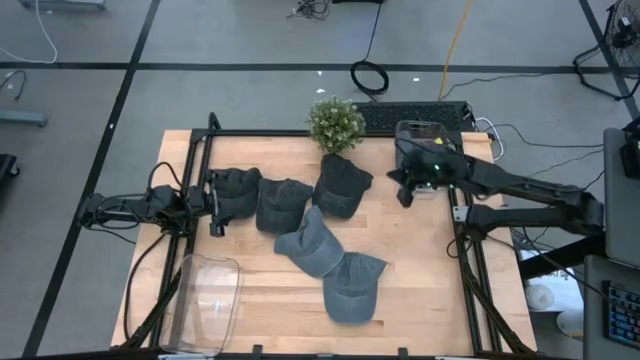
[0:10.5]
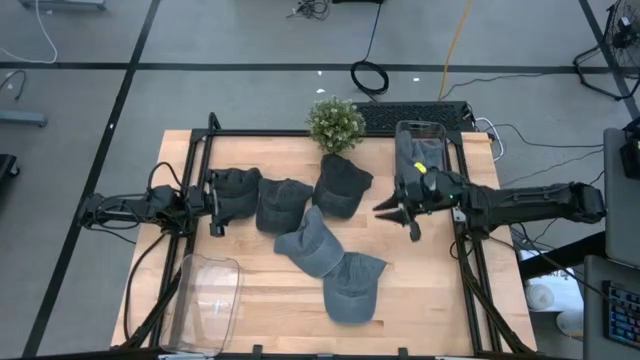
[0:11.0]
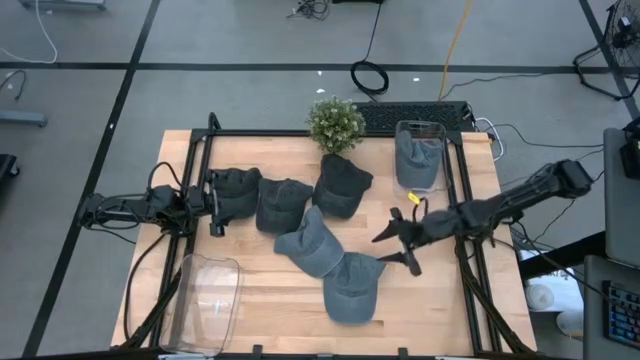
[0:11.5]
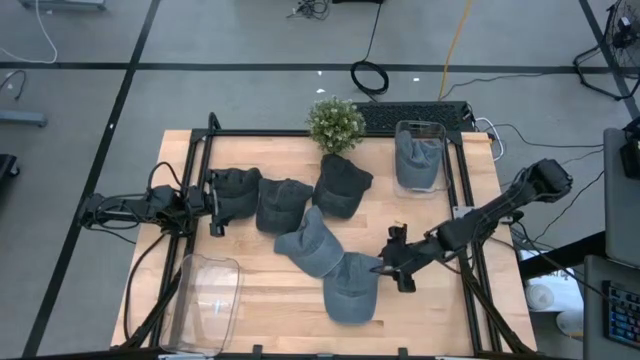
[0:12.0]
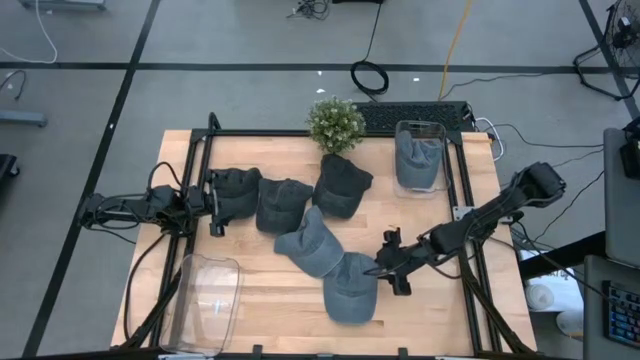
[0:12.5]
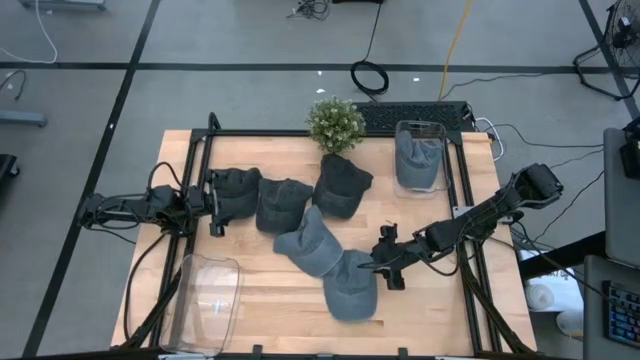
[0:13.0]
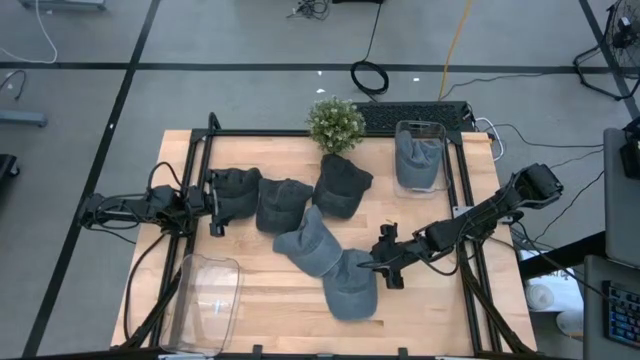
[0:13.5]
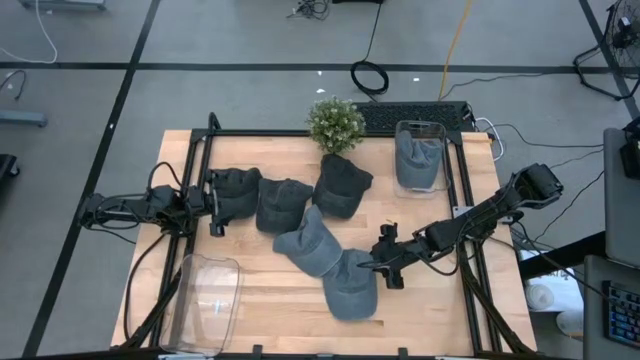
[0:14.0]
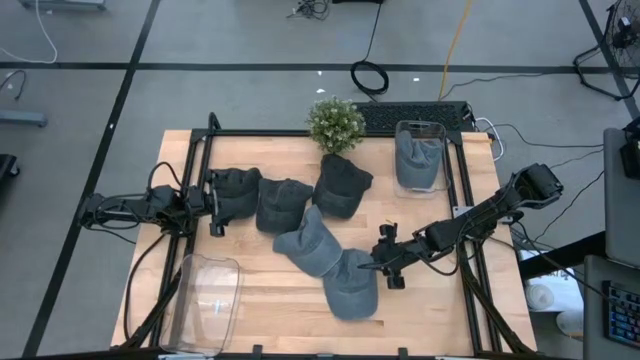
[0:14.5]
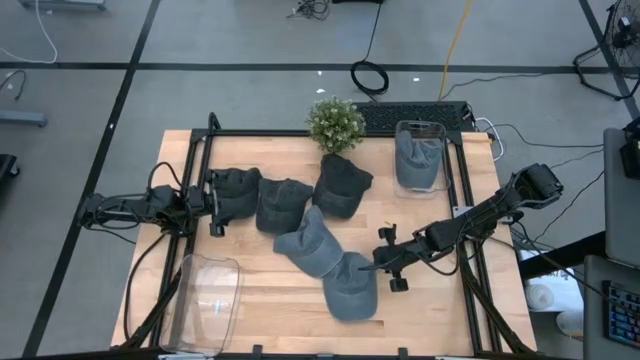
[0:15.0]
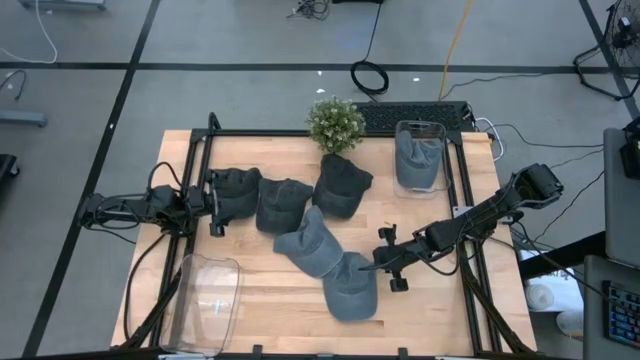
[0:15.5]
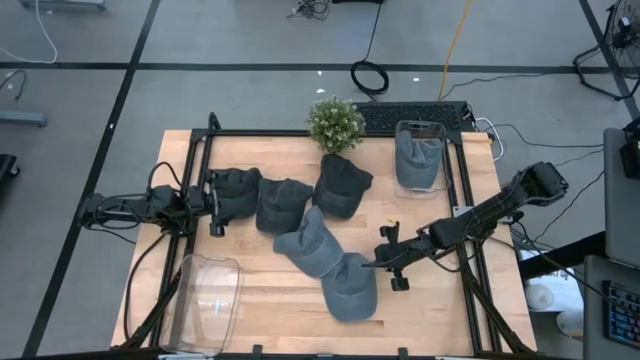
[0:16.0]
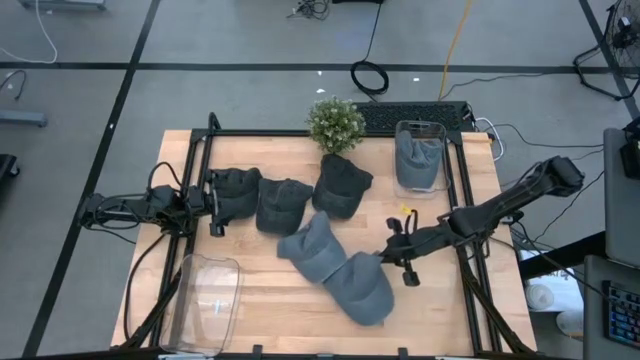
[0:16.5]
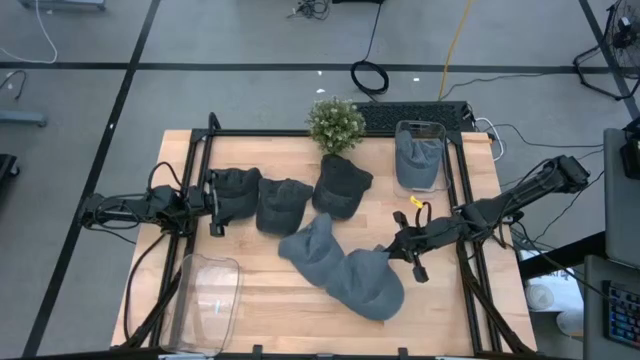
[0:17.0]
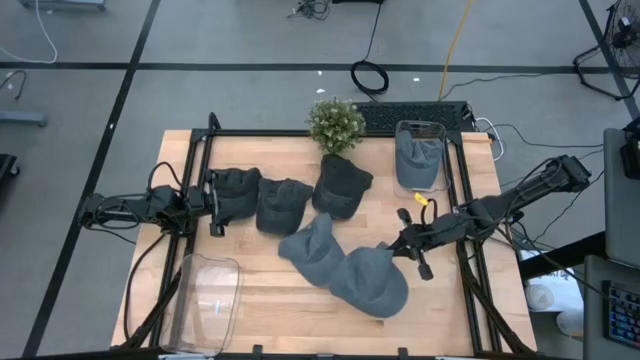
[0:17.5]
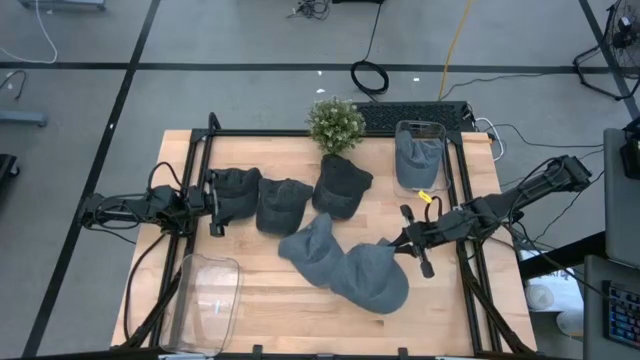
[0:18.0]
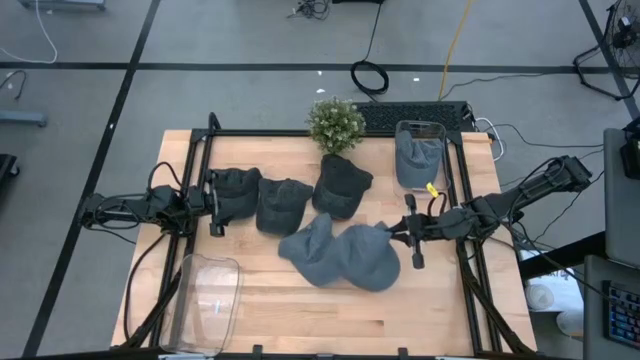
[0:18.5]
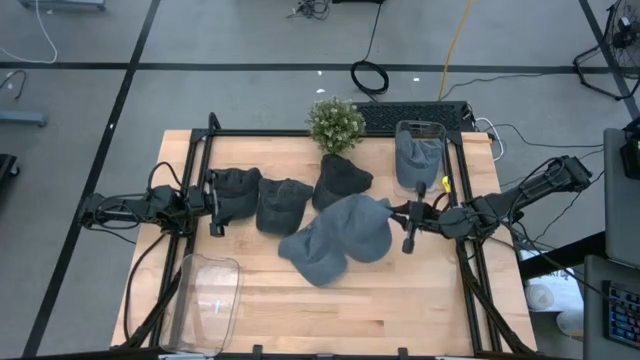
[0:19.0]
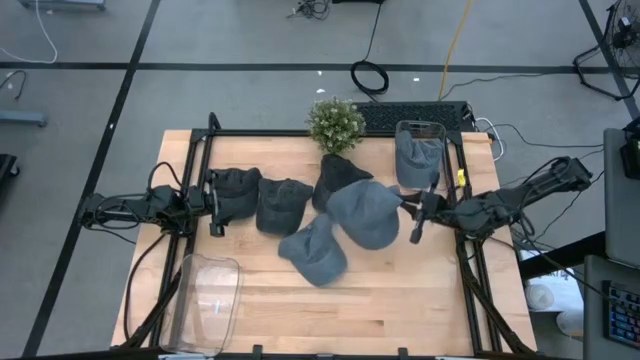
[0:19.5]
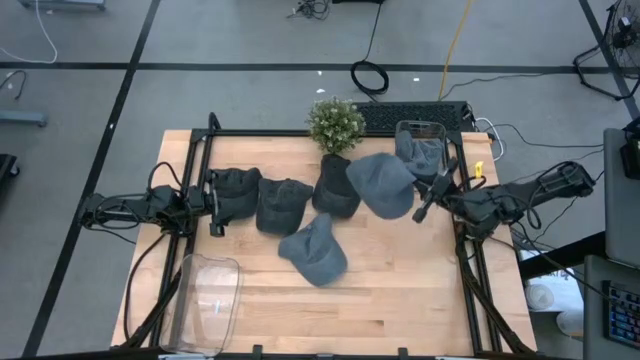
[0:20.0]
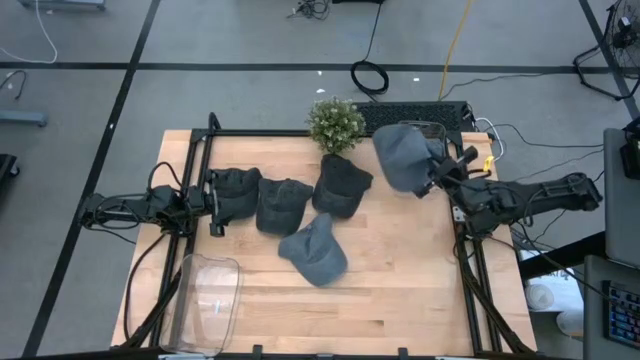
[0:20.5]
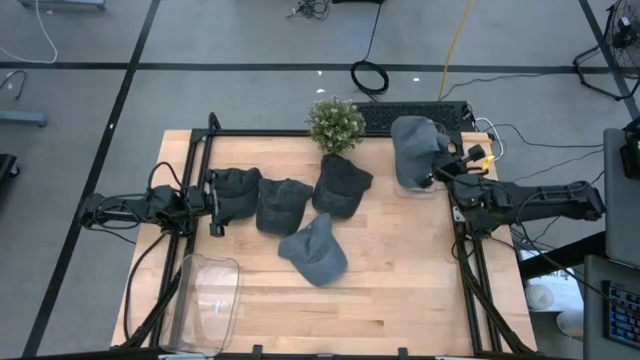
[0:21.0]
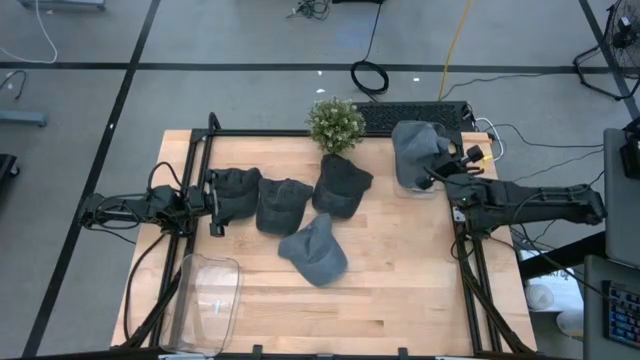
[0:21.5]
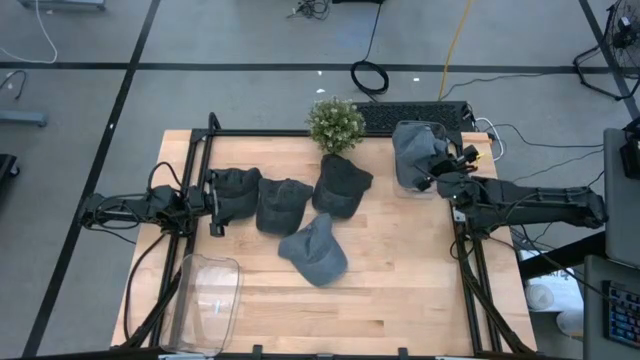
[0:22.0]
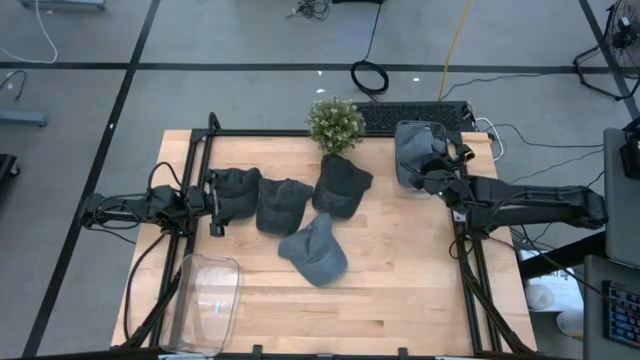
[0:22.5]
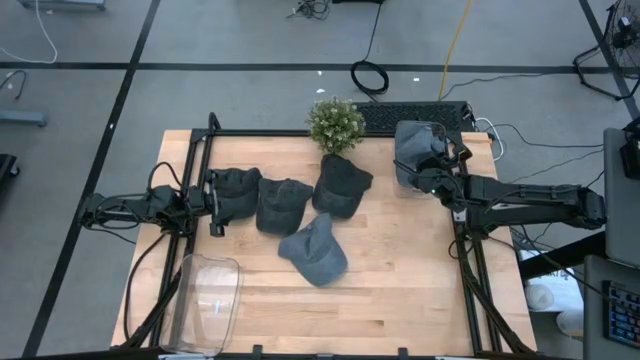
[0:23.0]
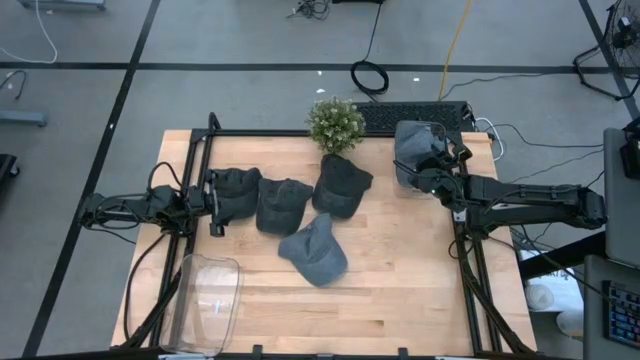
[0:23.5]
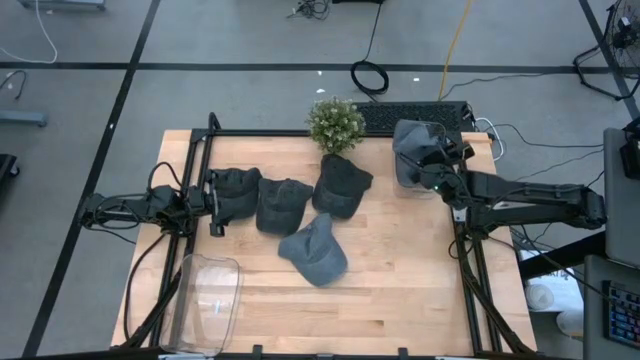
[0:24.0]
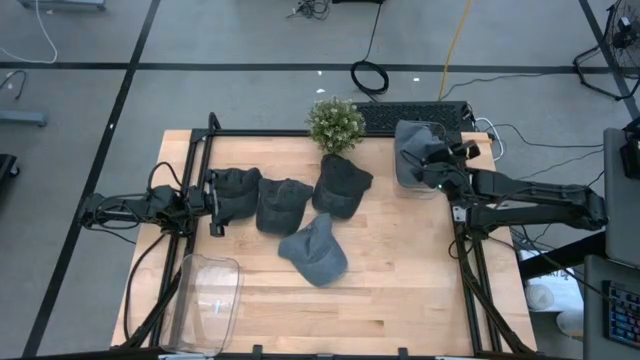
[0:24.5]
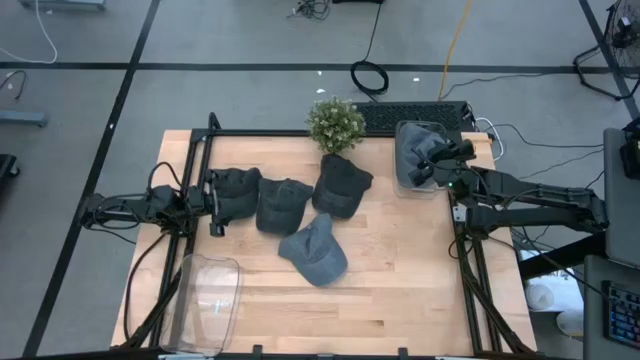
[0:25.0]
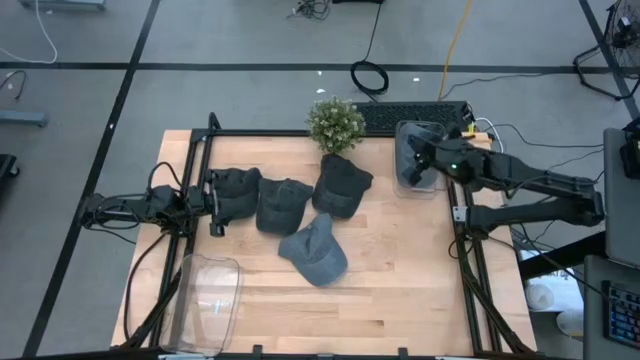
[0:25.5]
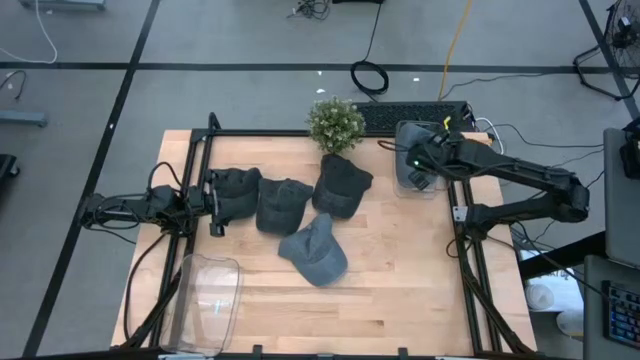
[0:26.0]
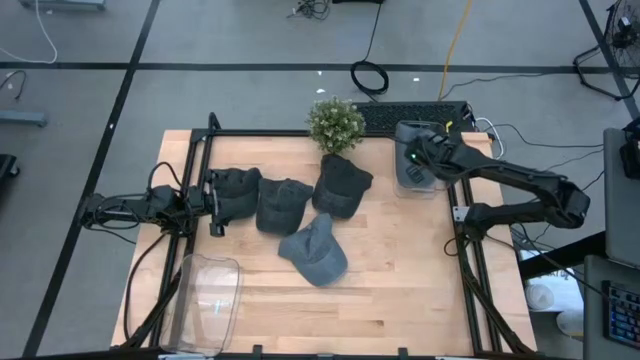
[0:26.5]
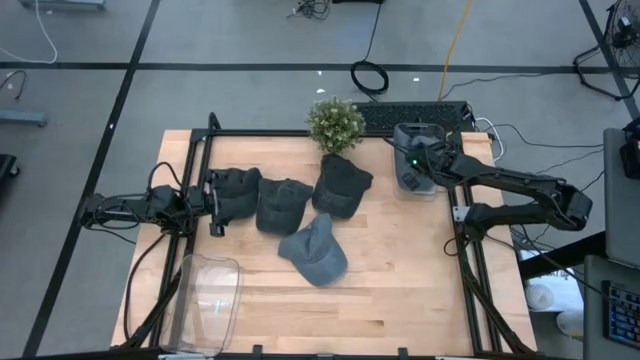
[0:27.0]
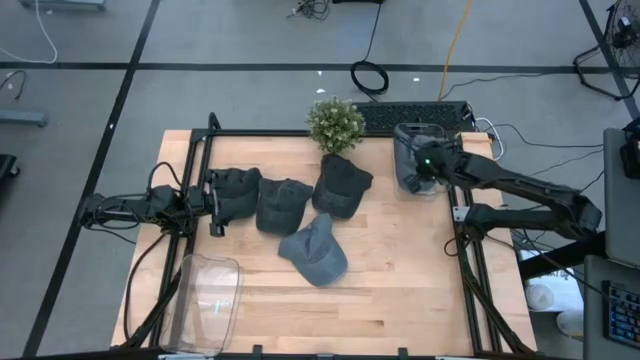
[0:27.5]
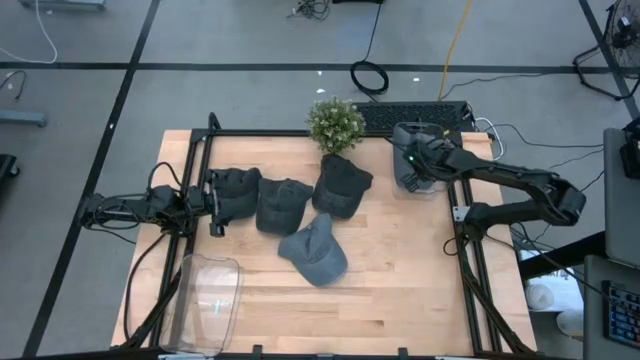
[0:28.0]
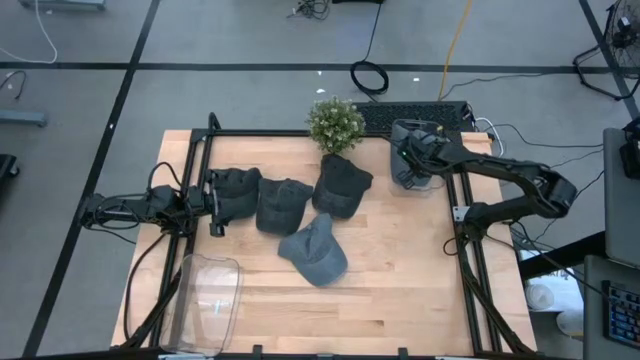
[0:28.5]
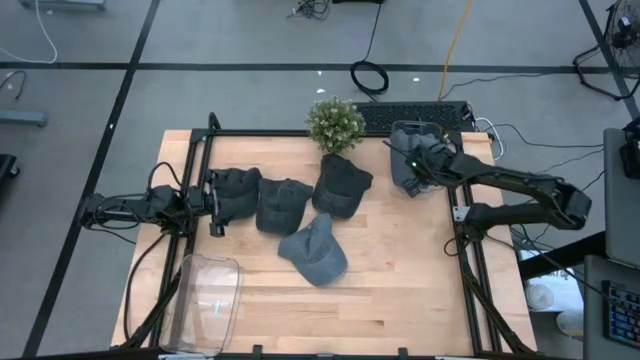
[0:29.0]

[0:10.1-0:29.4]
Task: Pick & Place hat
Put the bottom gray cap into the top transparent bin
